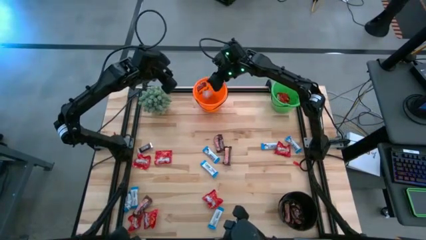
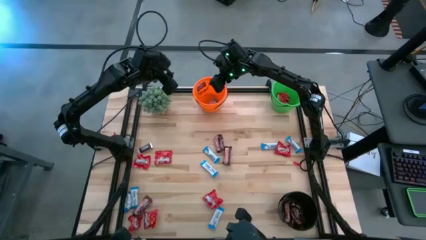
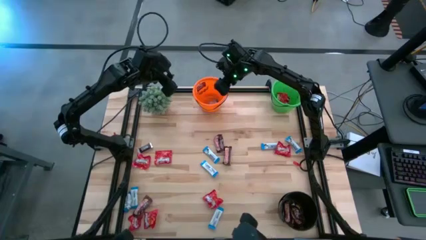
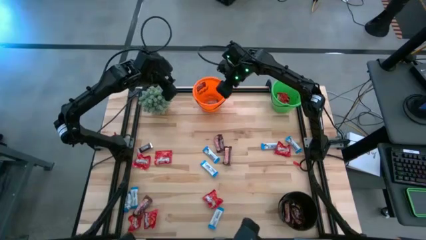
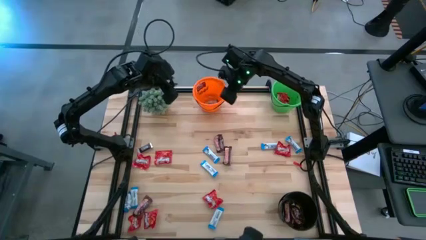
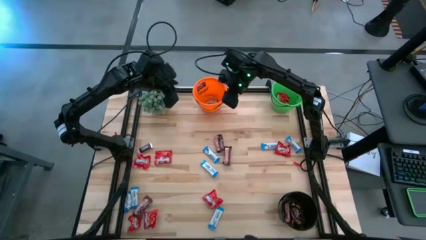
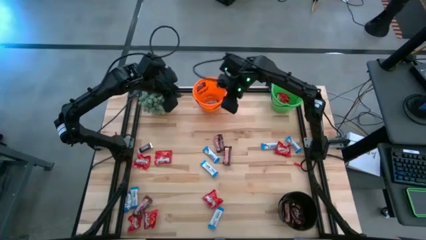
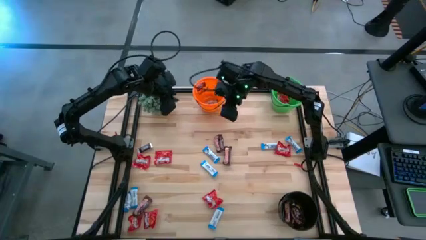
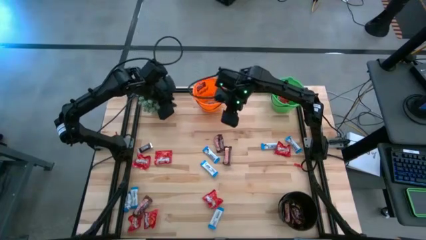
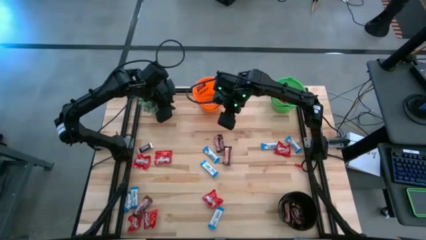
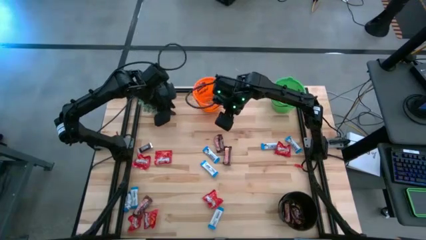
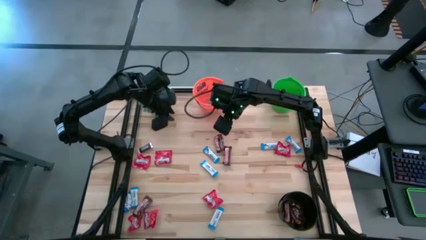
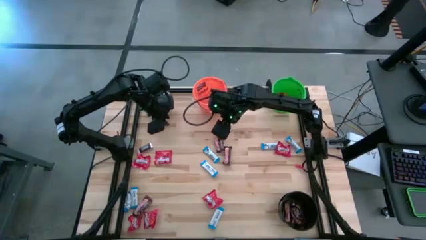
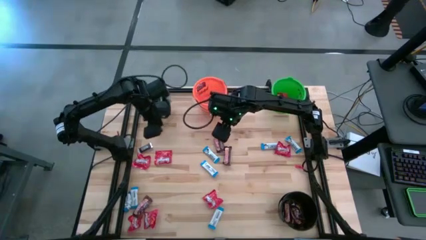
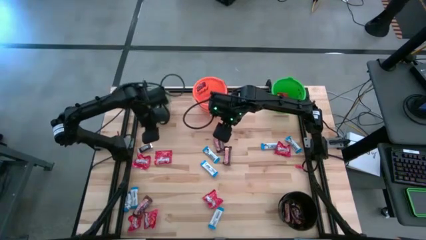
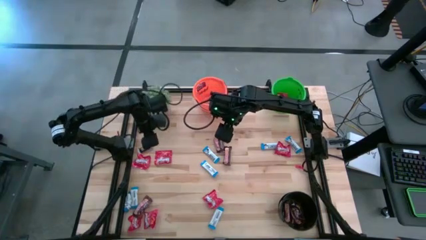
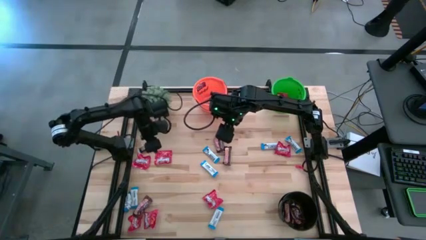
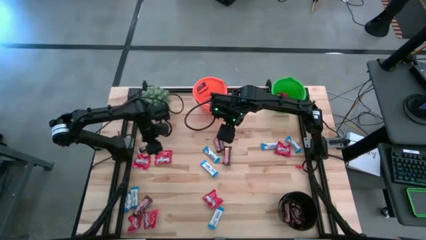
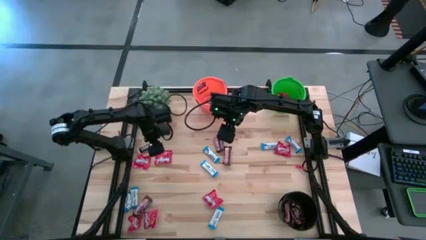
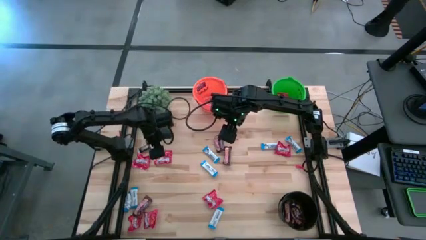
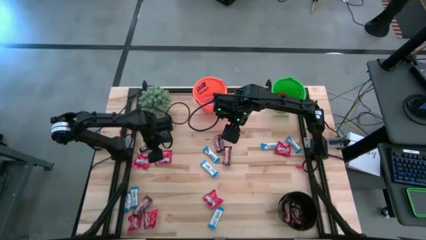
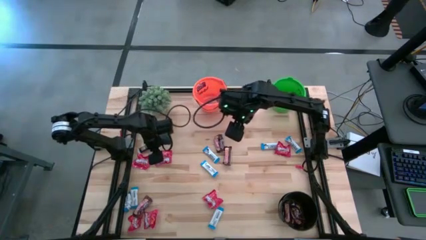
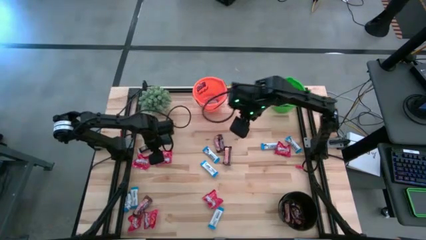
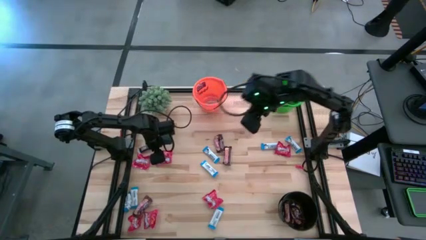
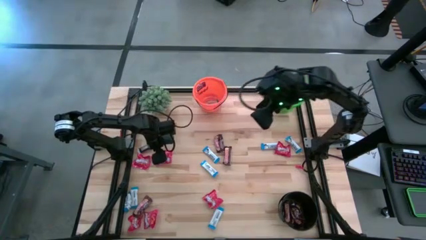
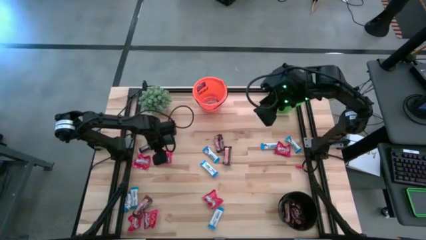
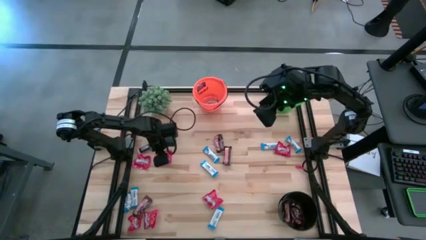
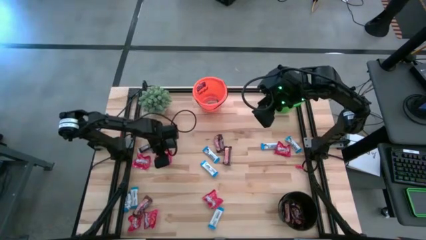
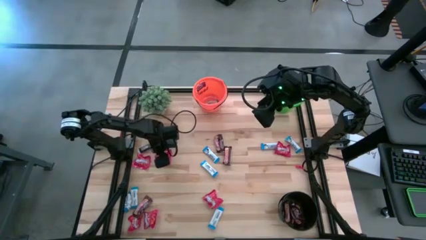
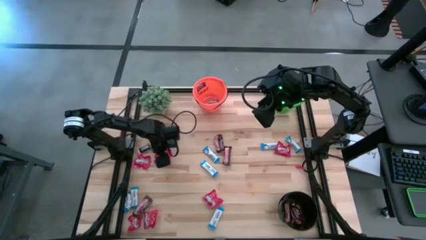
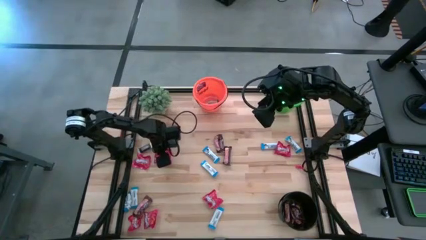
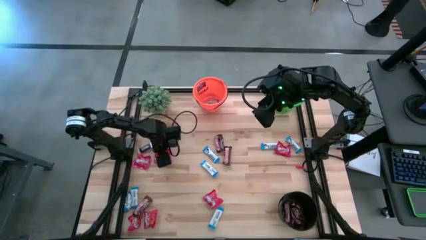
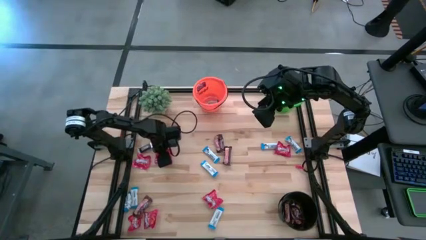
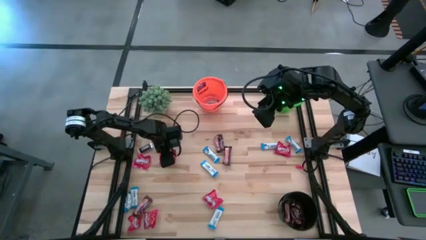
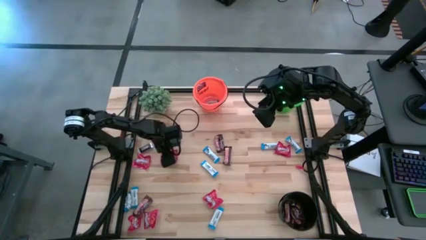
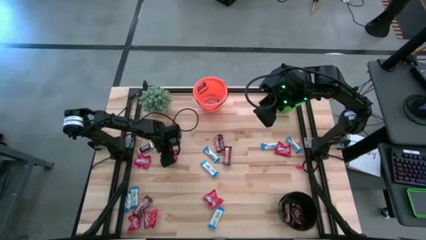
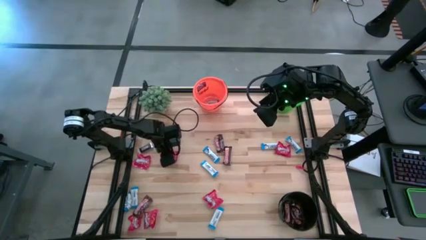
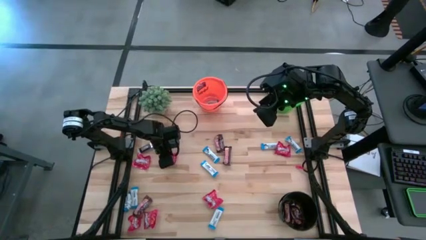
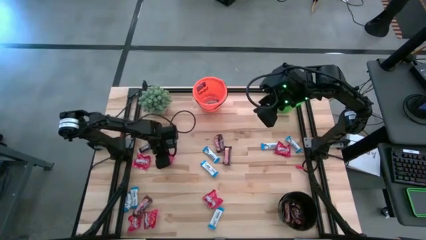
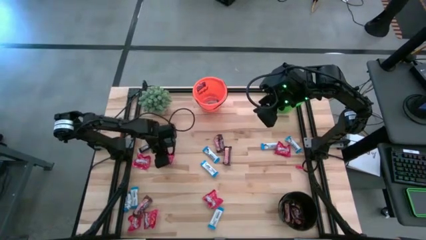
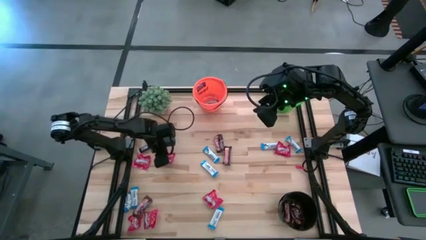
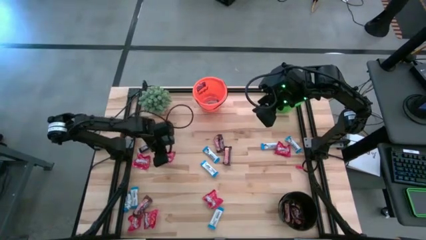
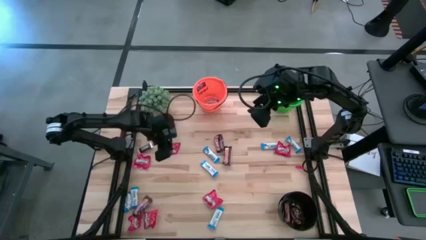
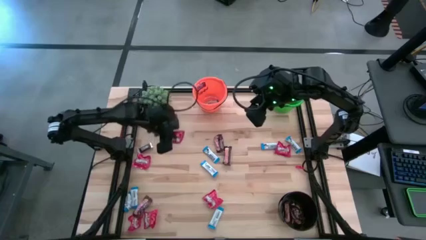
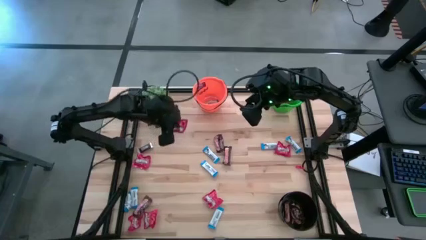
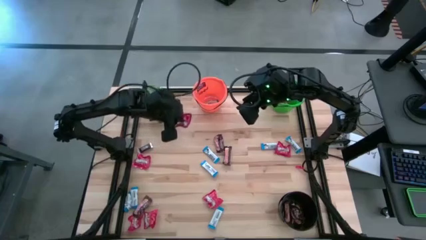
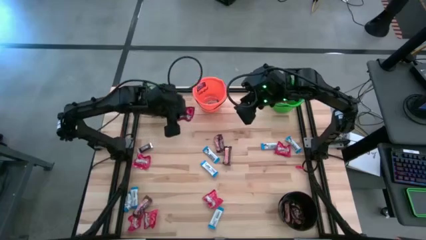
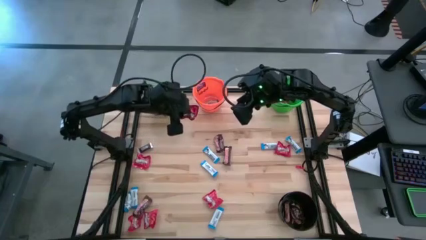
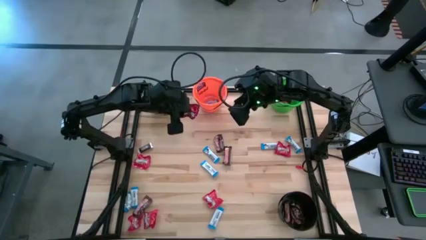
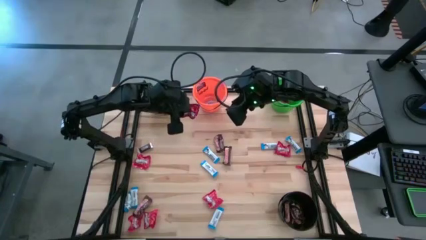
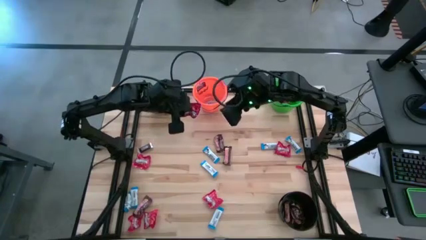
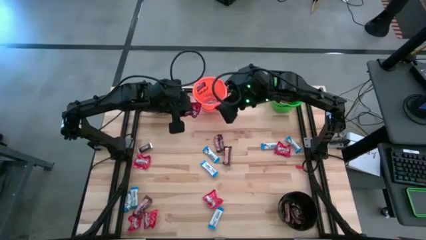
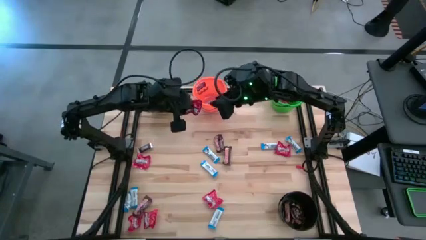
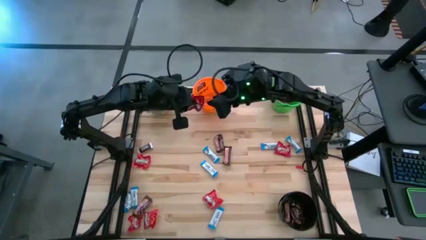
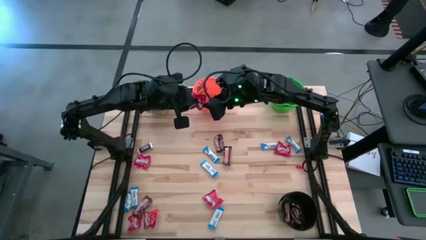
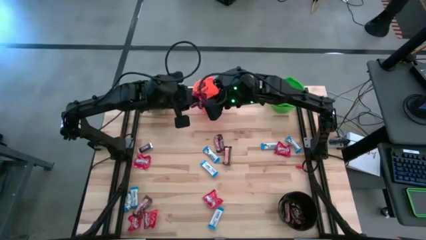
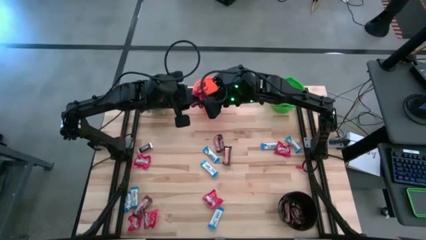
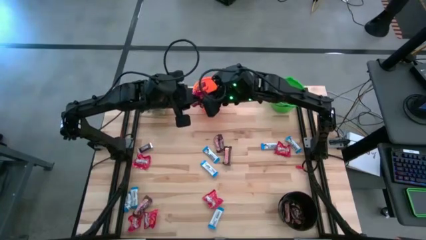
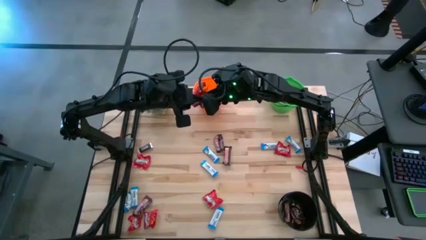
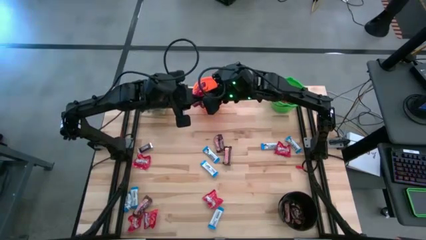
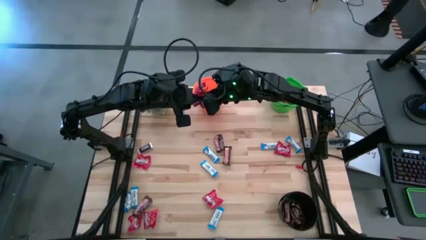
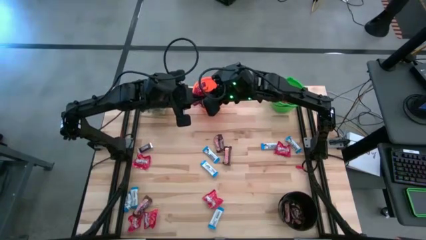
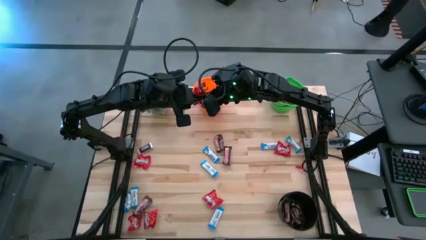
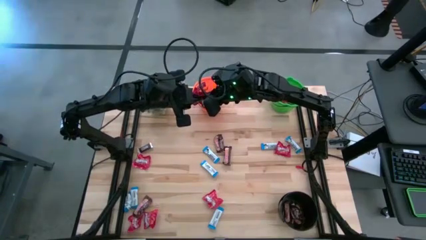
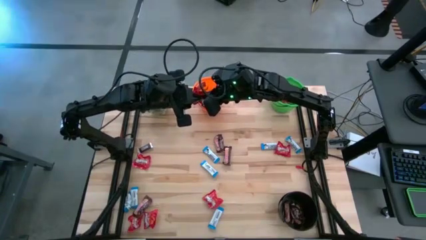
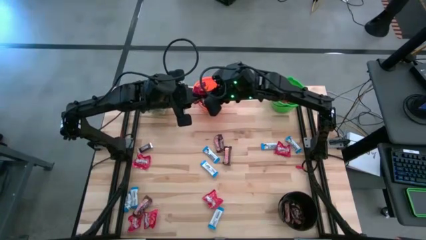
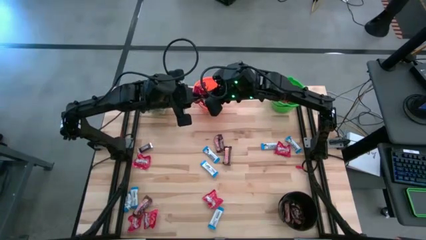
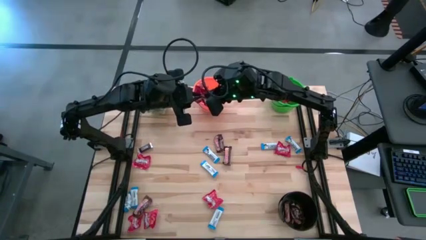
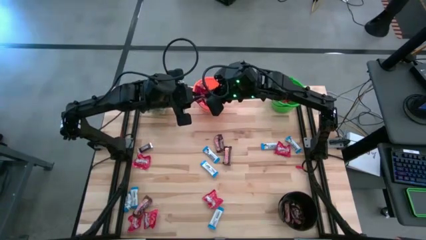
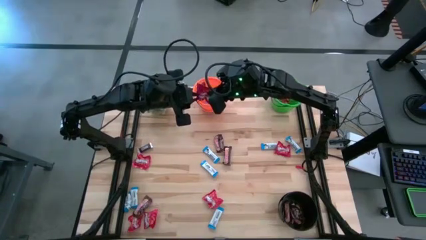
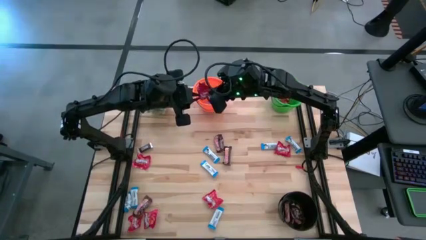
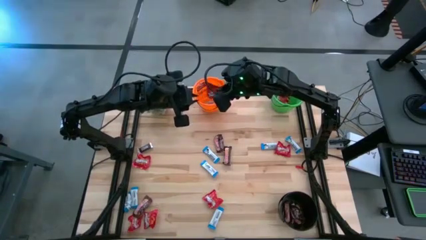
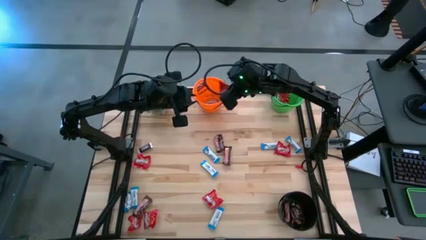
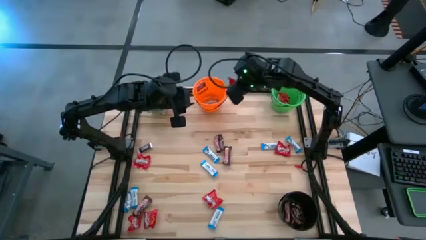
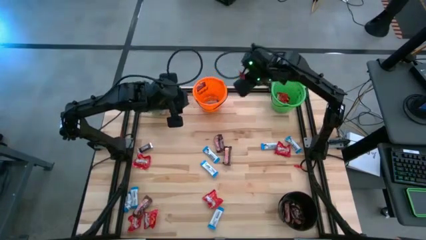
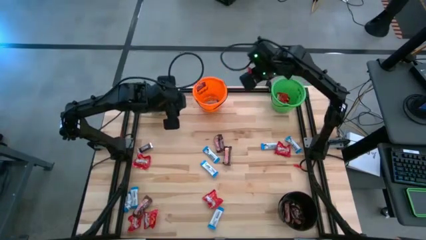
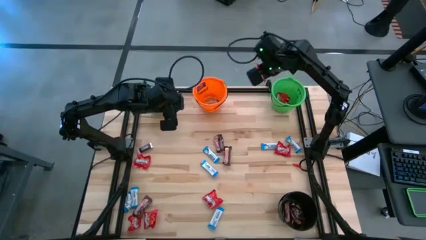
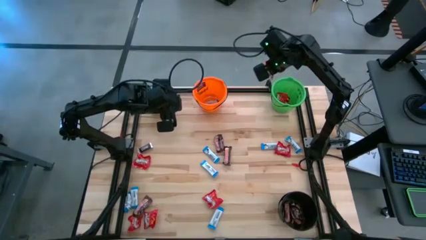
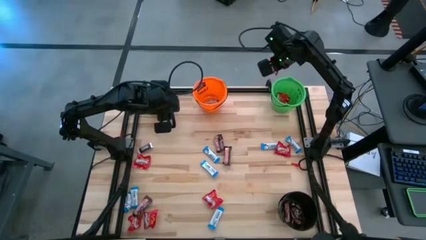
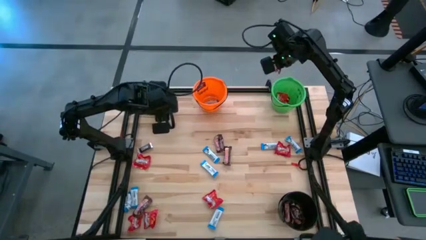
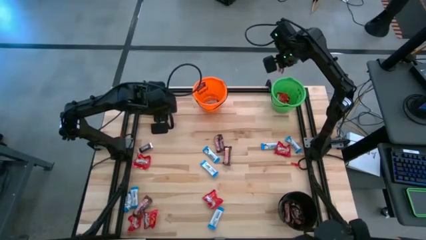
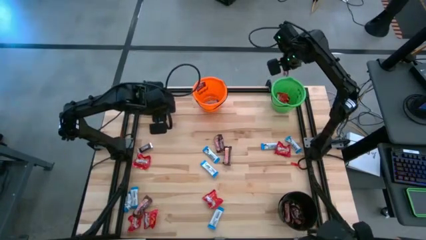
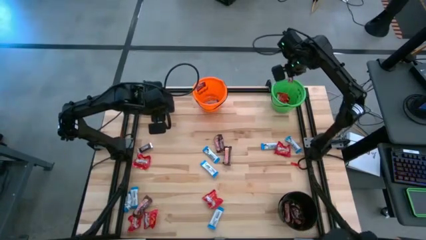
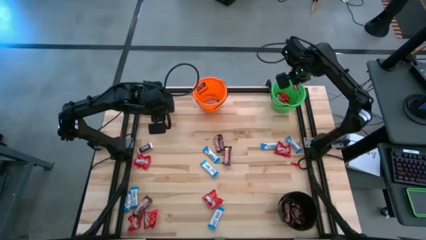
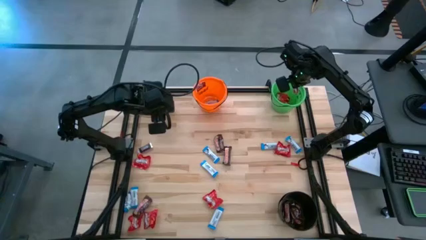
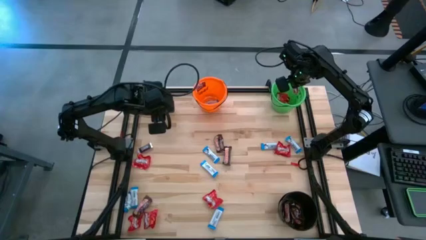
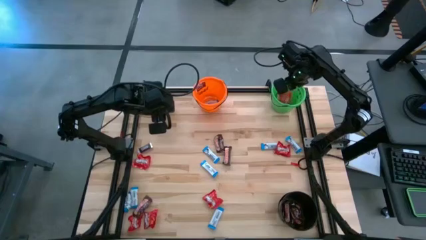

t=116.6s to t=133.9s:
Task: Organize candy in baskets
Put the red candy into the green bucket
